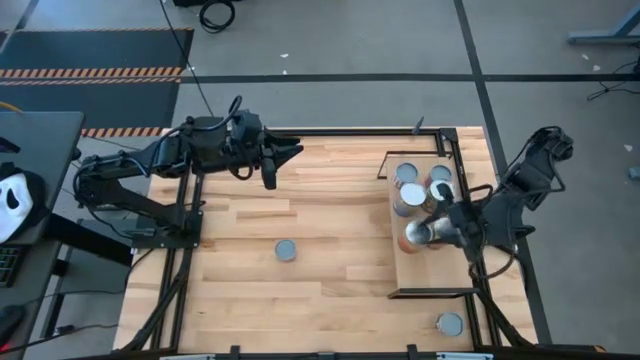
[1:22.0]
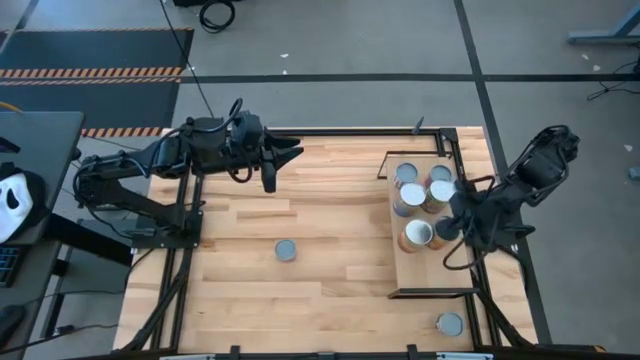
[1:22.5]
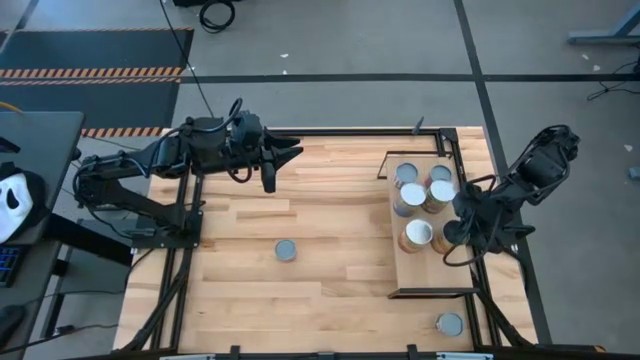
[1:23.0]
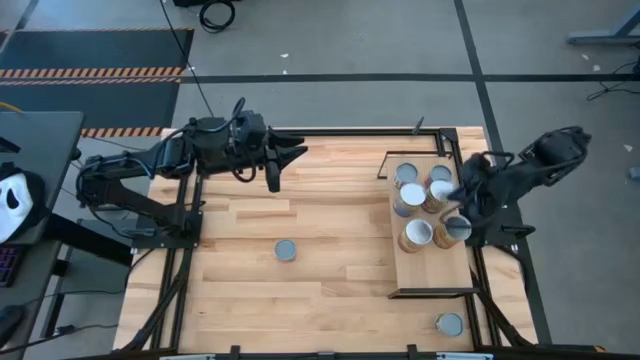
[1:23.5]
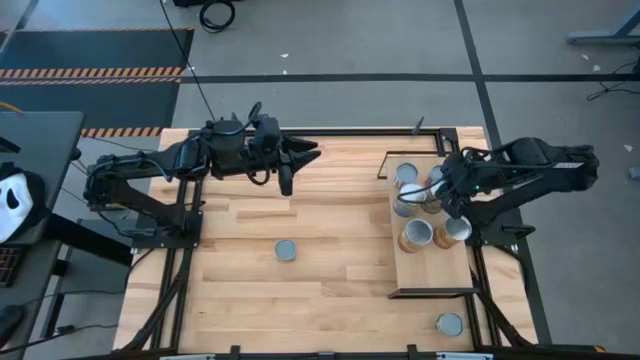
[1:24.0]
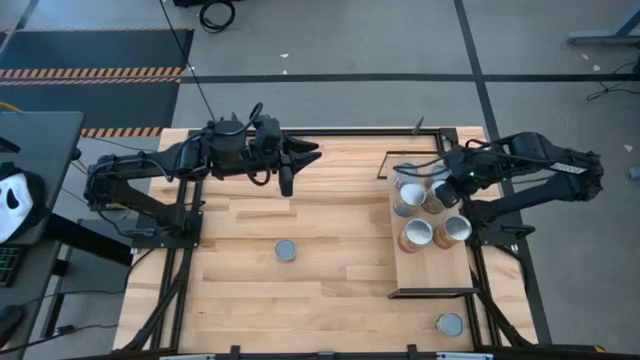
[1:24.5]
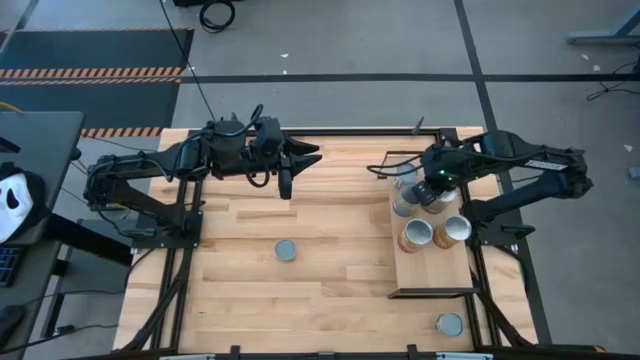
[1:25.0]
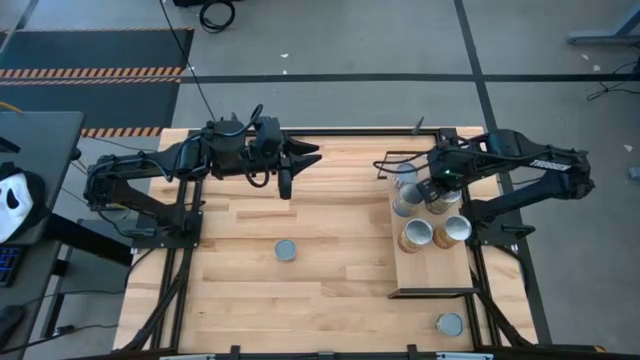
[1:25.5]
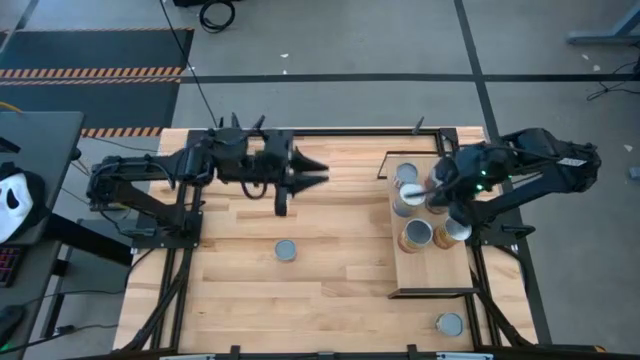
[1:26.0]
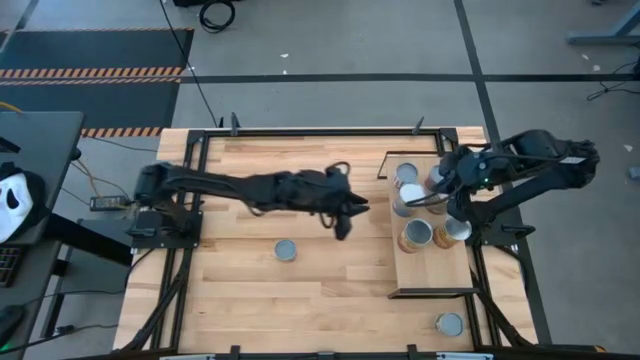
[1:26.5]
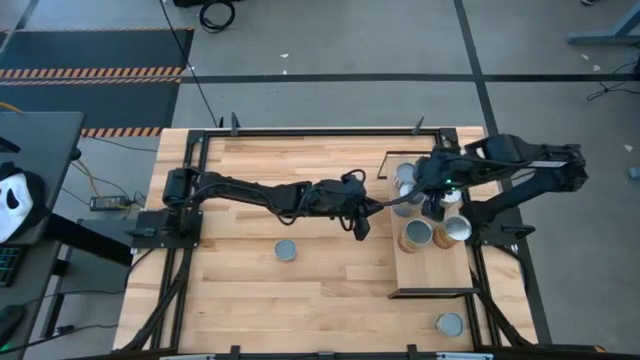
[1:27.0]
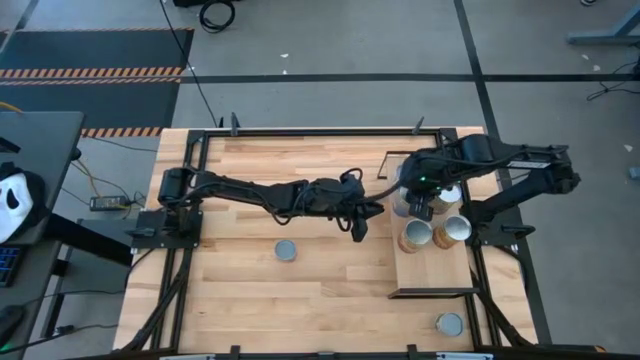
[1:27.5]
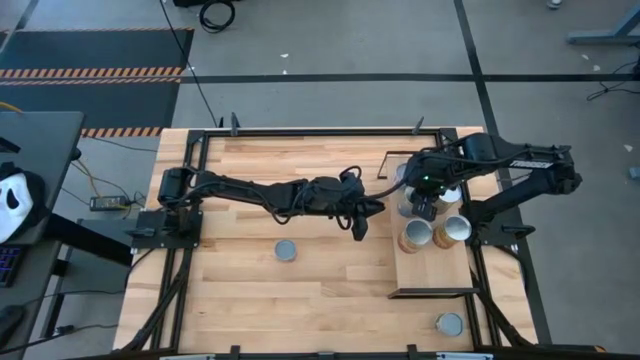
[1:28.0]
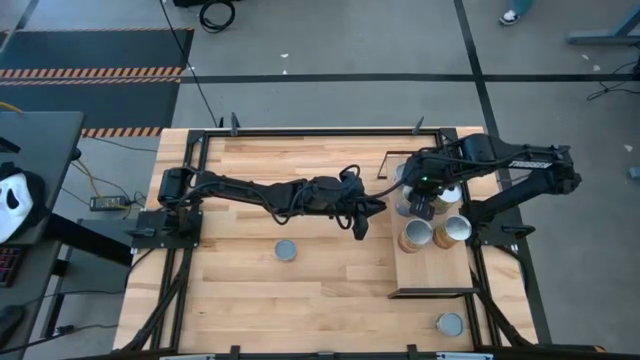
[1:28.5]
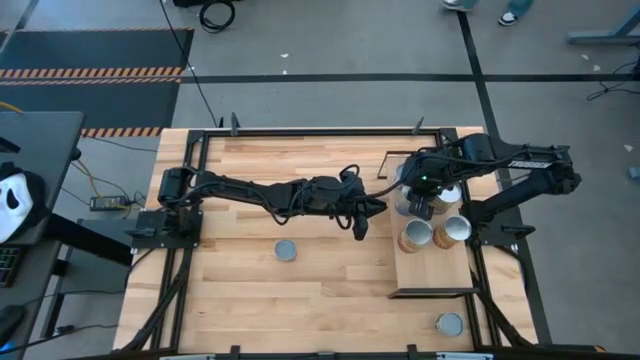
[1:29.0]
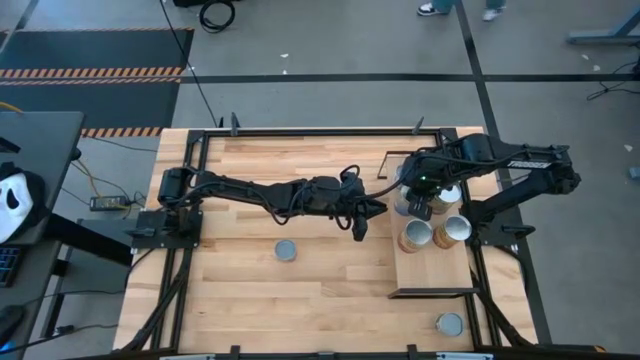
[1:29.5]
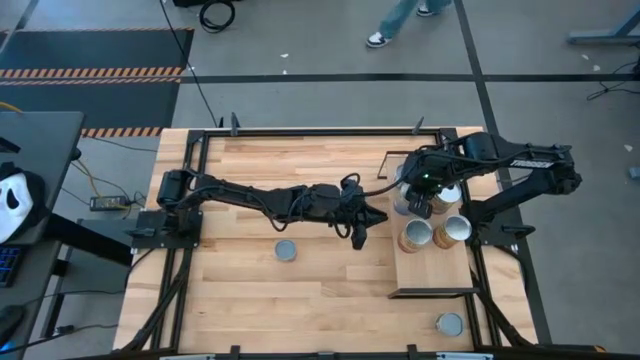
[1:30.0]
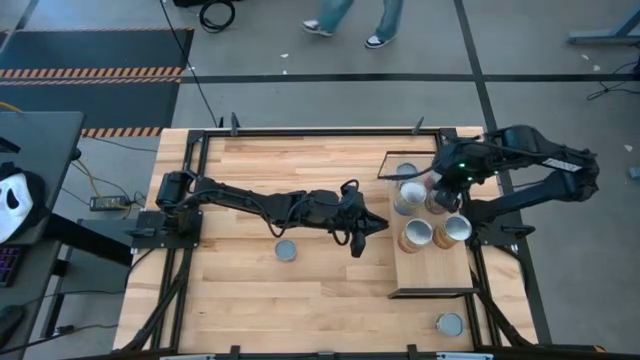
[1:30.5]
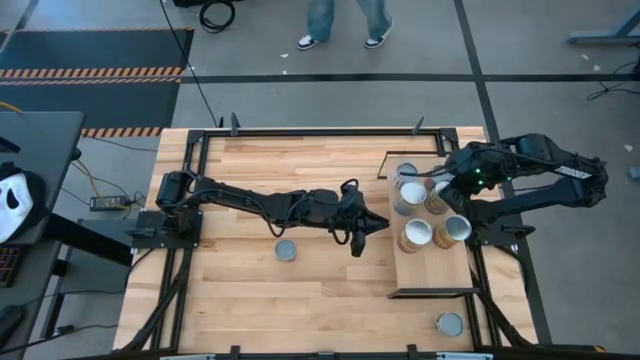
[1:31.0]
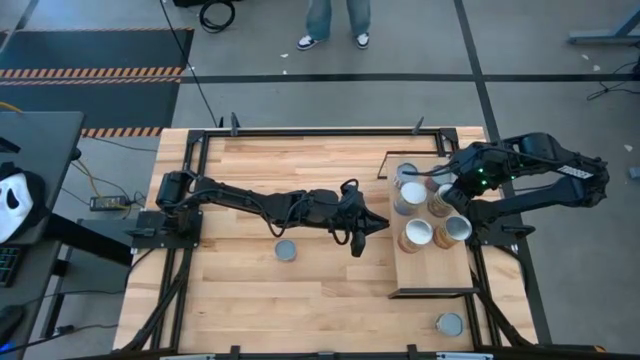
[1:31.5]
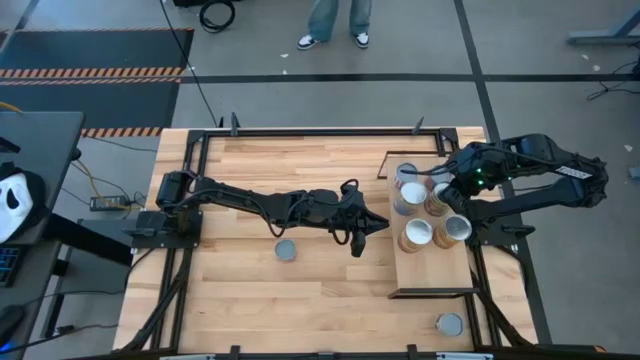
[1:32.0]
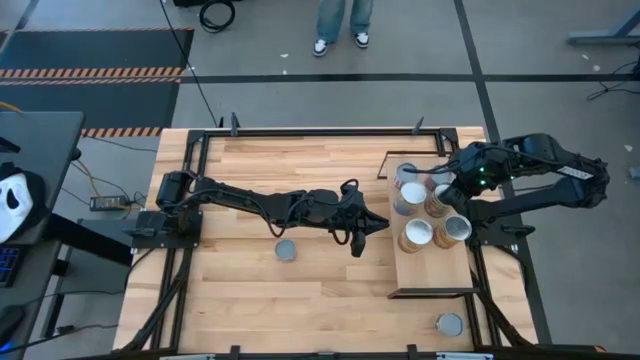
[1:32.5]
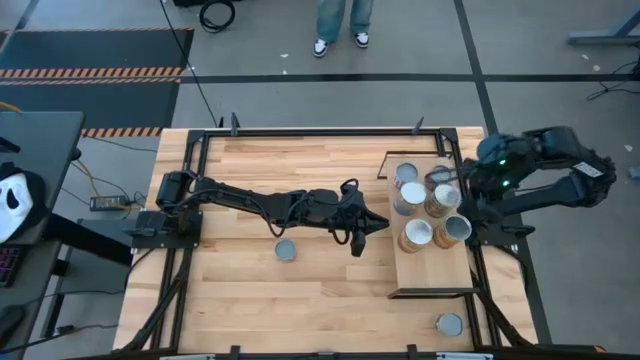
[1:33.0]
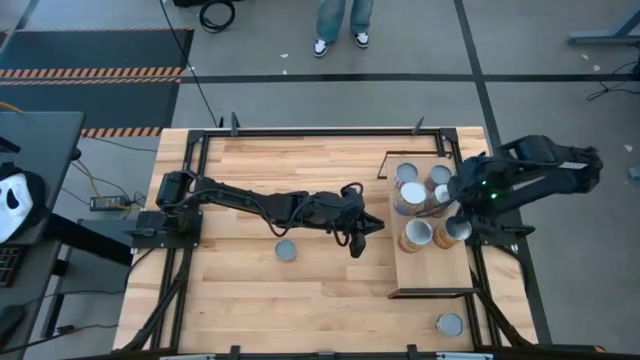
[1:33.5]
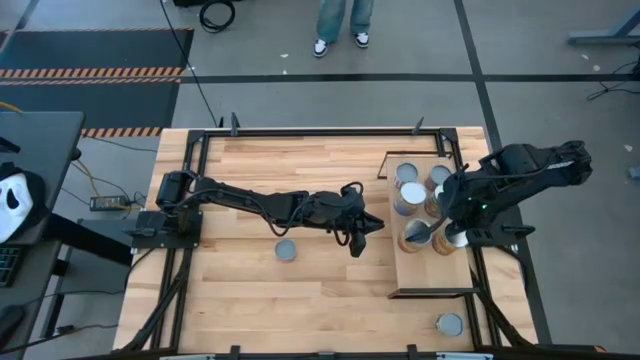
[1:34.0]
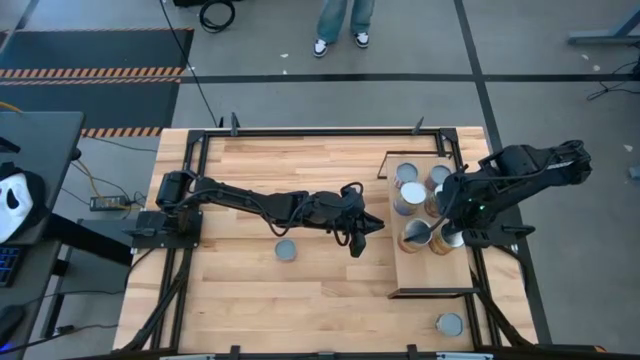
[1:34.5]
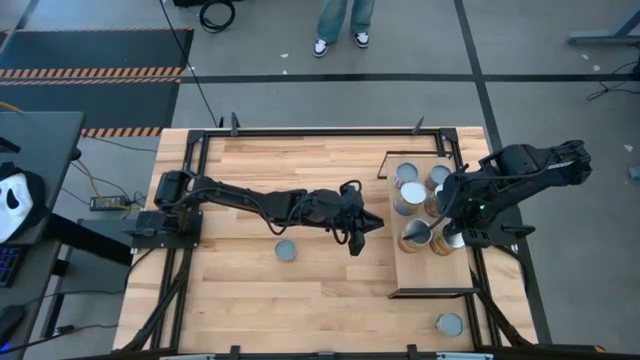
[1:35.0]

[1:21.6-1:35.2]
Task: Pick and place cans onto a shelf
Adjust the canned goods on the shelf

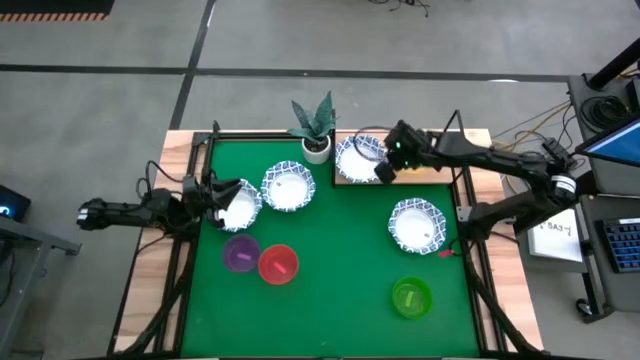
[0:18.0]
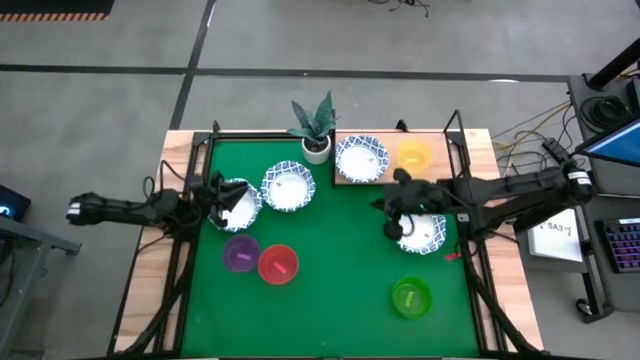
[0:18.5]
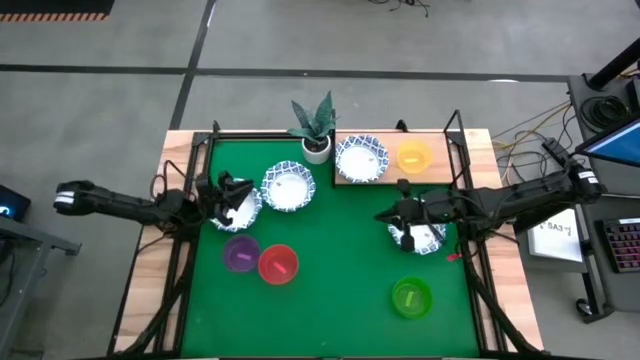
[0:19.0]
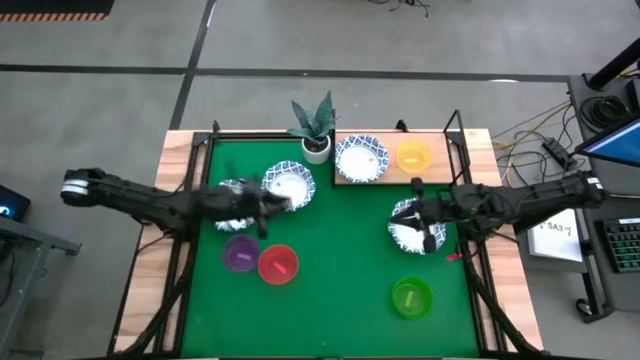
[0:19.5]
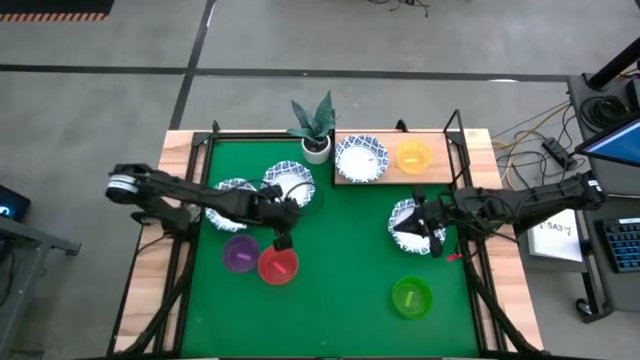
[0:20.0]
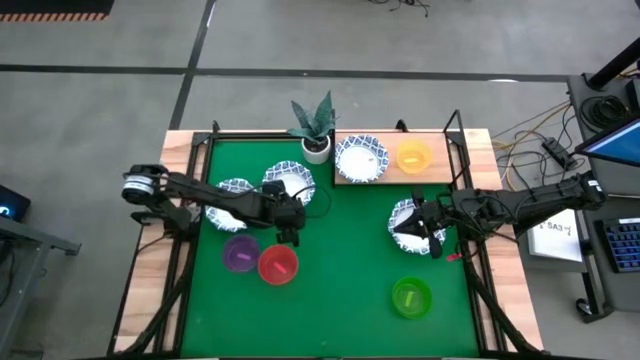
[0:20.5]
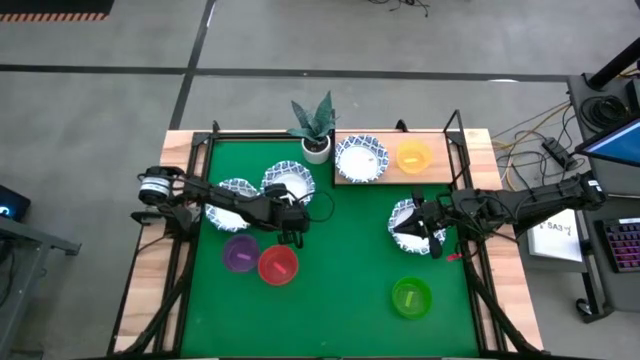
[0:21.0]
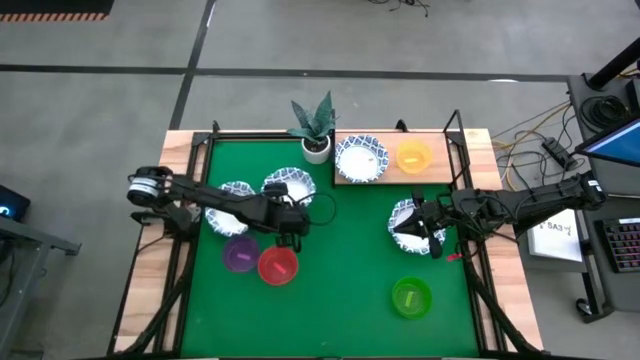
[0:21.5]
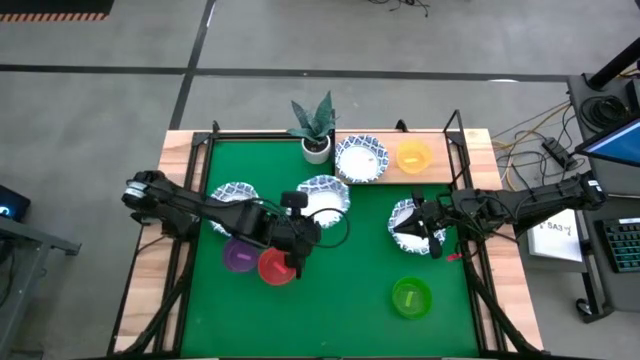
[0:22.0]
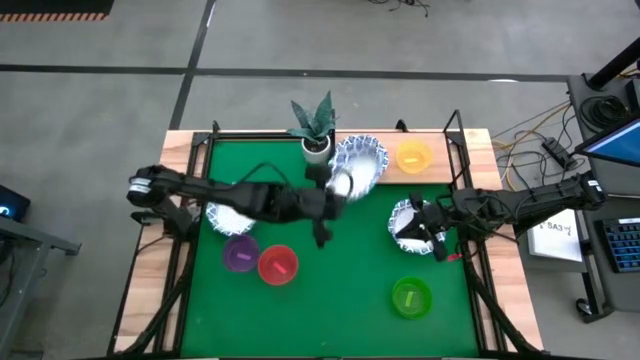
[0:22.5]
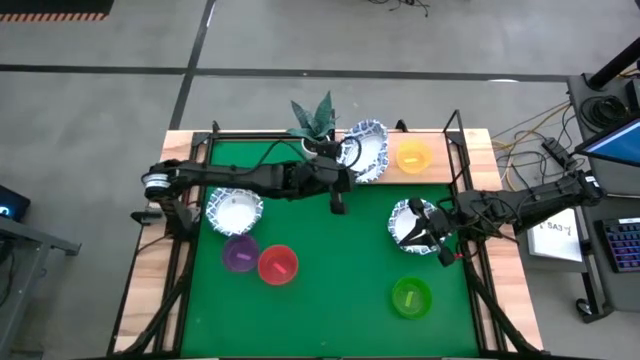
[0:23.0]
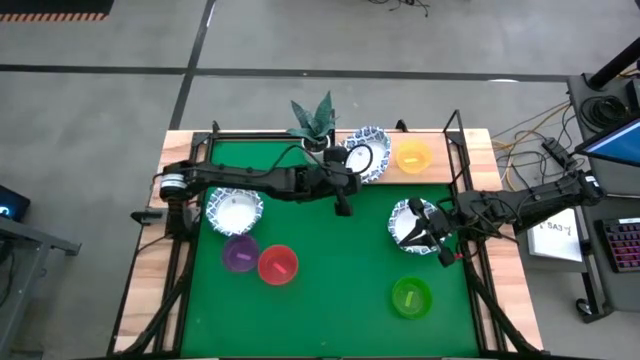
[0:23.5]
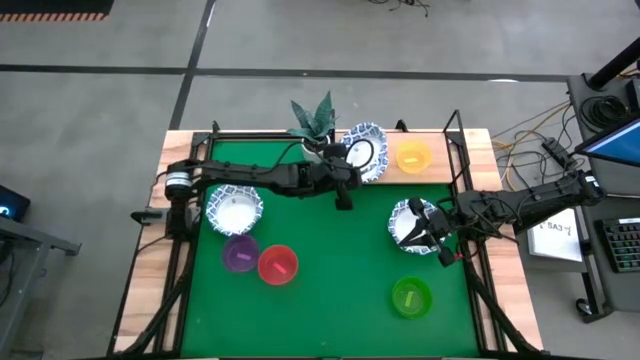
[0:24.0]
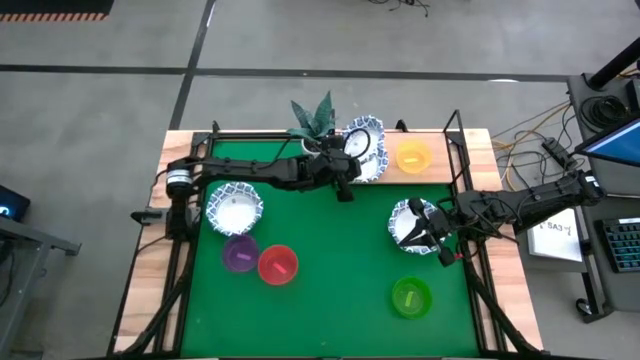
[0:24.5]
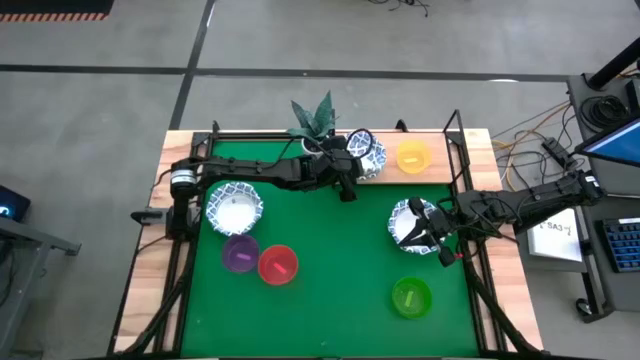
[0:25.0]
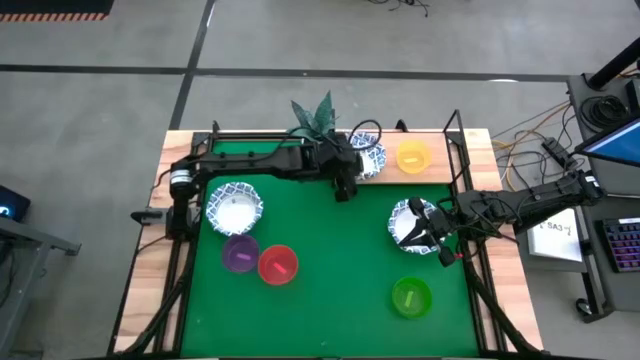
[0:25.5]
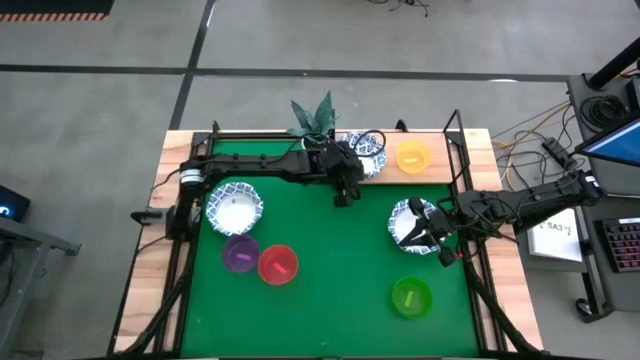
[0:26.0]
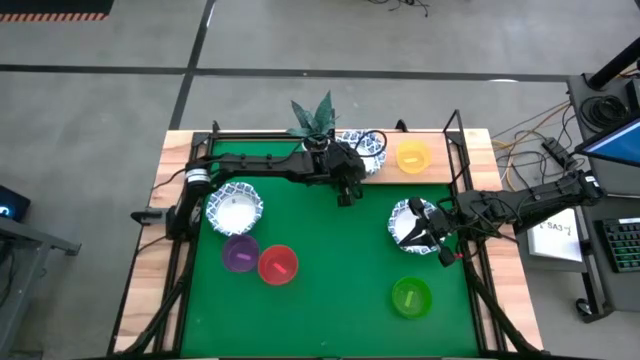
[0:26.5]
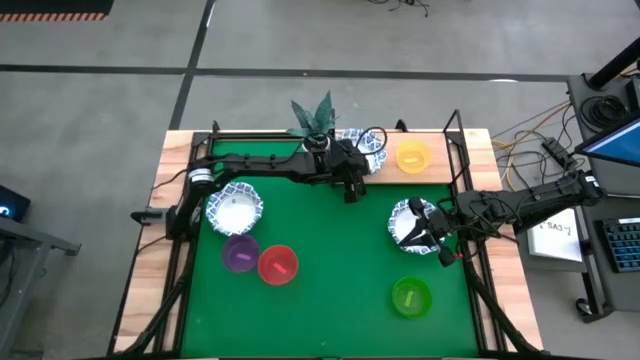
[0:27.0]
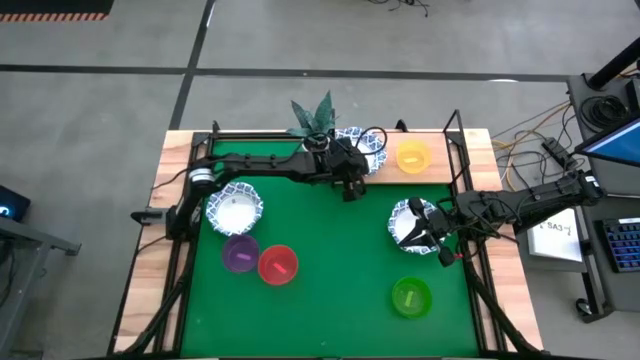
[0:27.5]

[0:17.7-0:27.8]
Task: Place and stack bowls onto a shelf
Stack the white and blue bowl on top of the white and blue bowl
